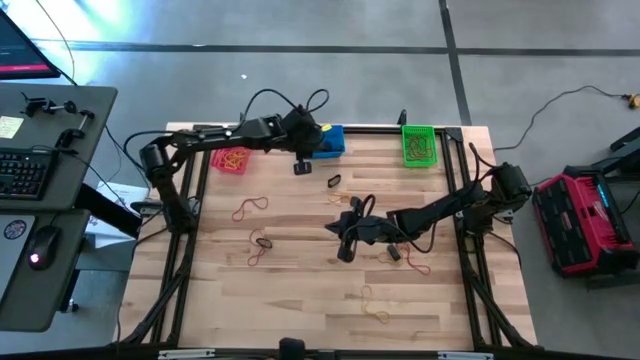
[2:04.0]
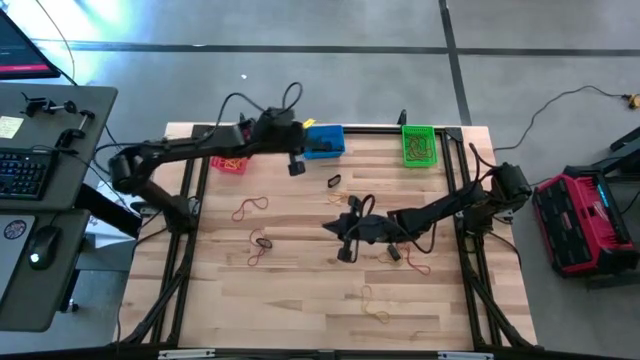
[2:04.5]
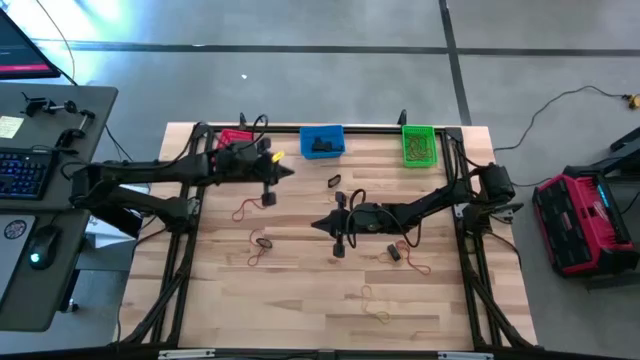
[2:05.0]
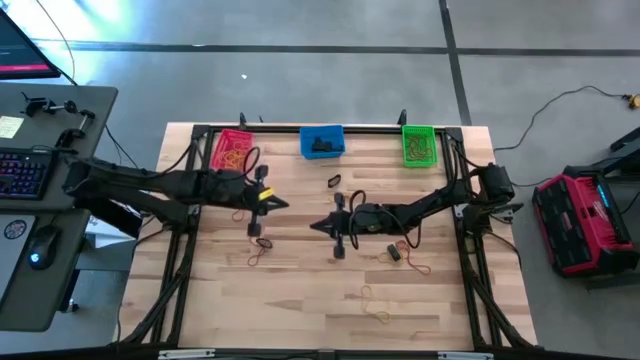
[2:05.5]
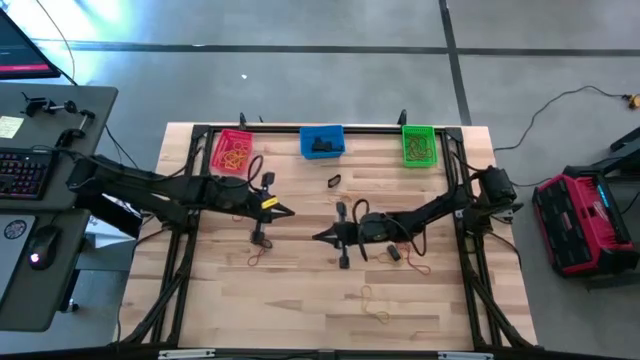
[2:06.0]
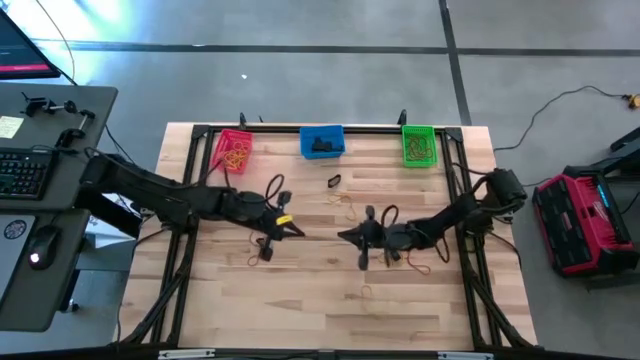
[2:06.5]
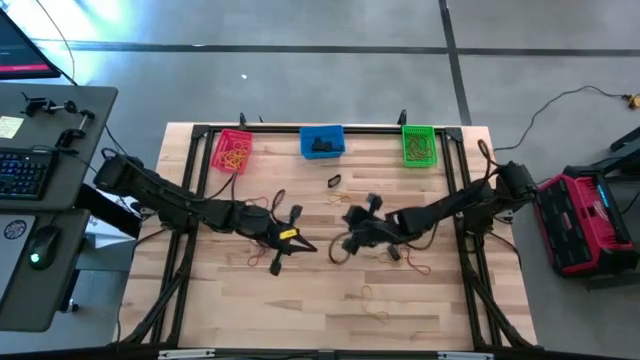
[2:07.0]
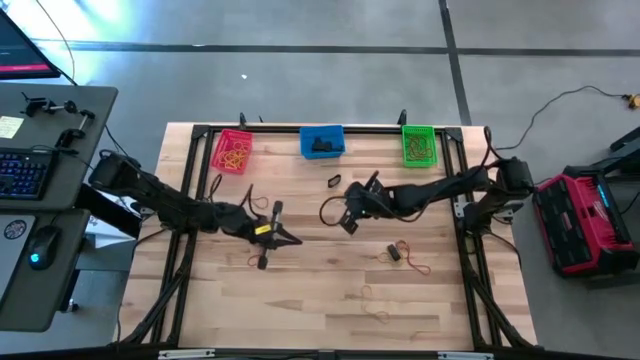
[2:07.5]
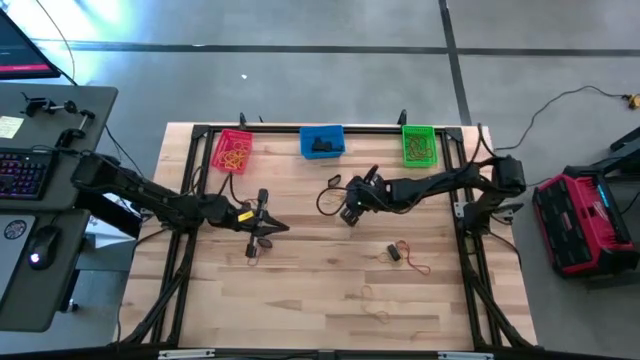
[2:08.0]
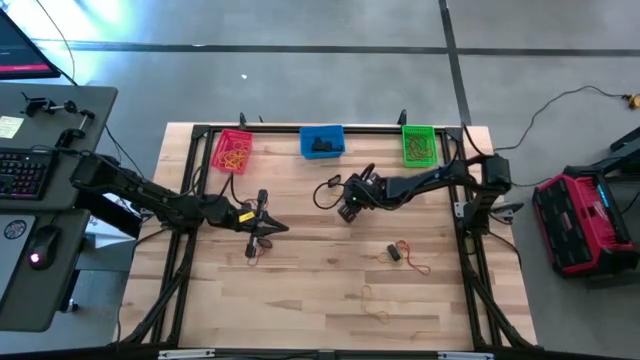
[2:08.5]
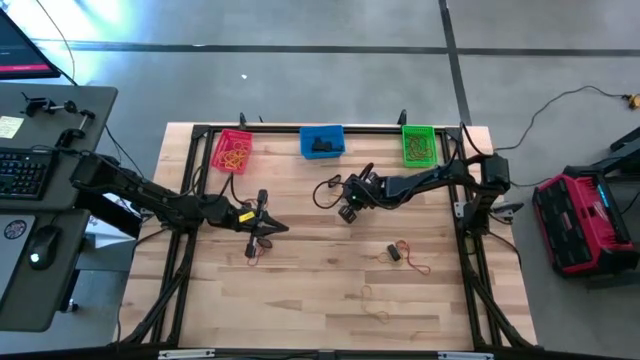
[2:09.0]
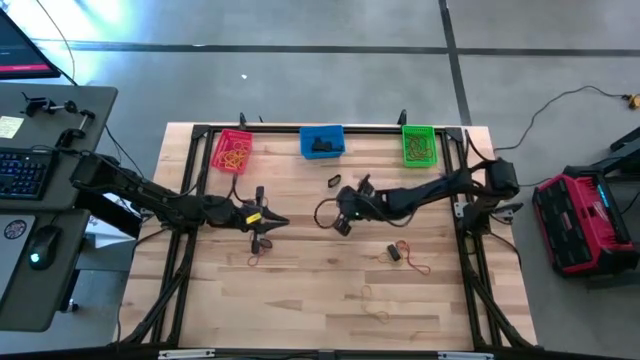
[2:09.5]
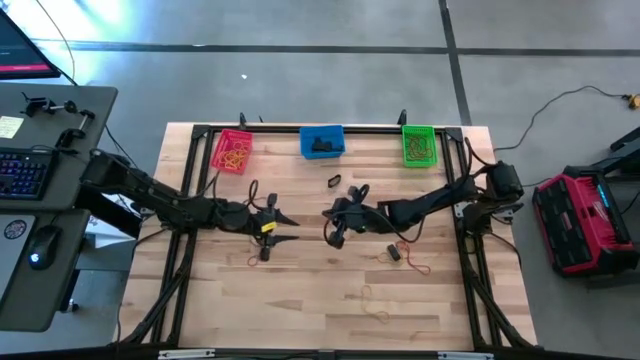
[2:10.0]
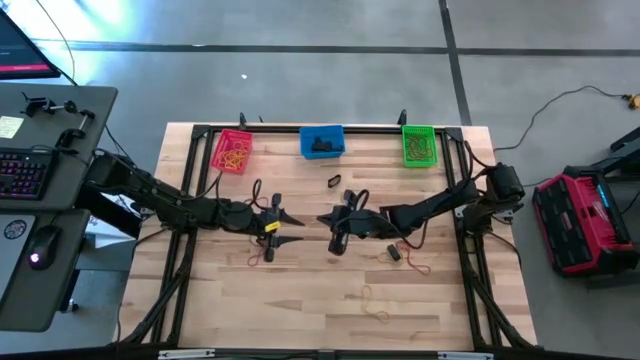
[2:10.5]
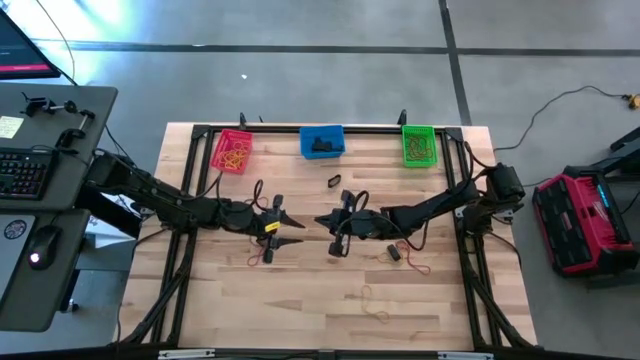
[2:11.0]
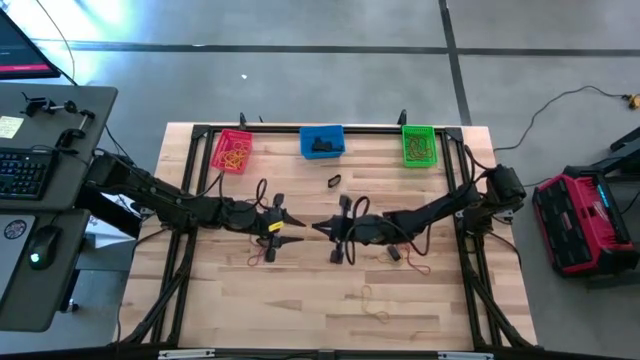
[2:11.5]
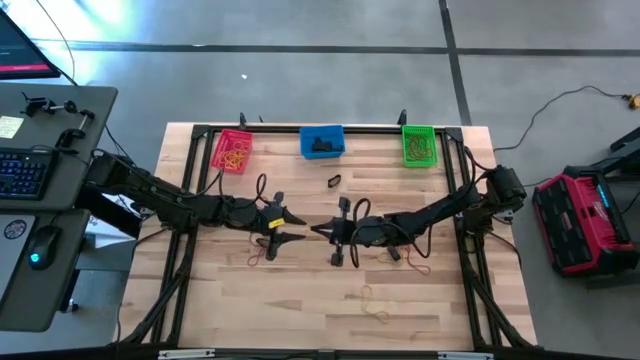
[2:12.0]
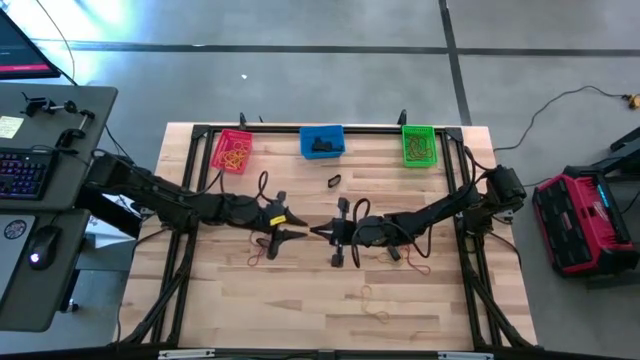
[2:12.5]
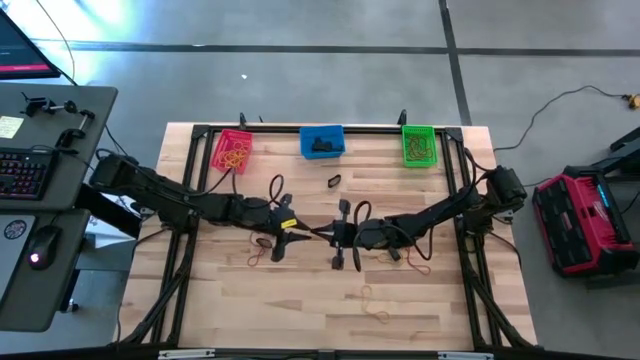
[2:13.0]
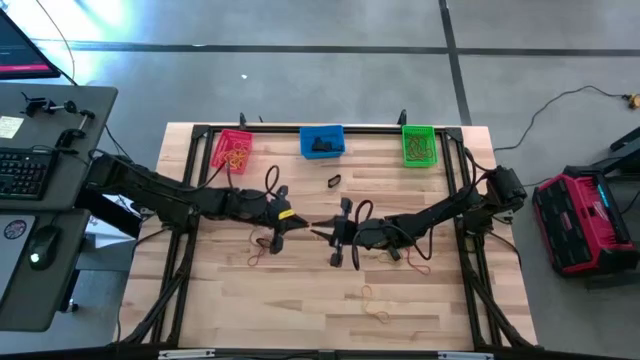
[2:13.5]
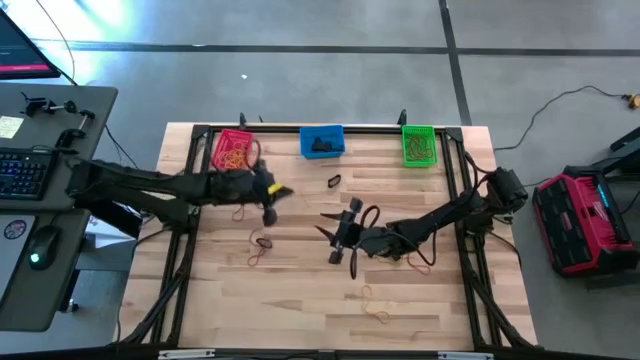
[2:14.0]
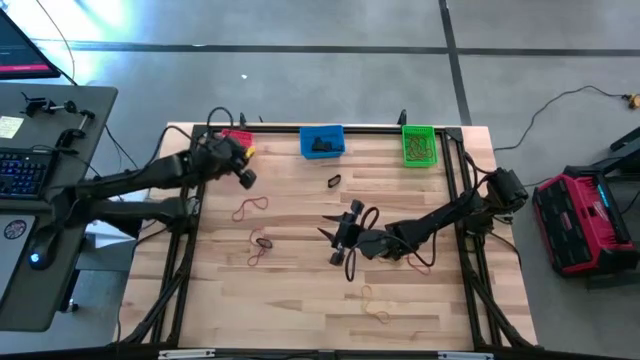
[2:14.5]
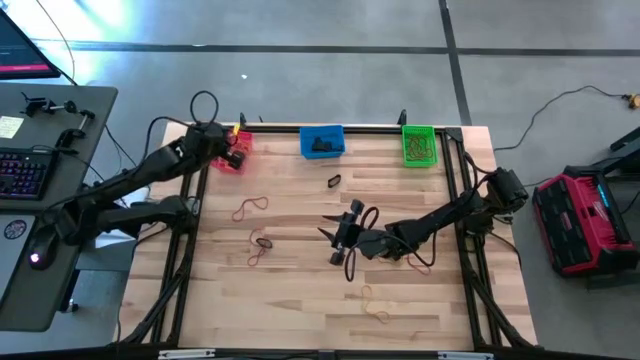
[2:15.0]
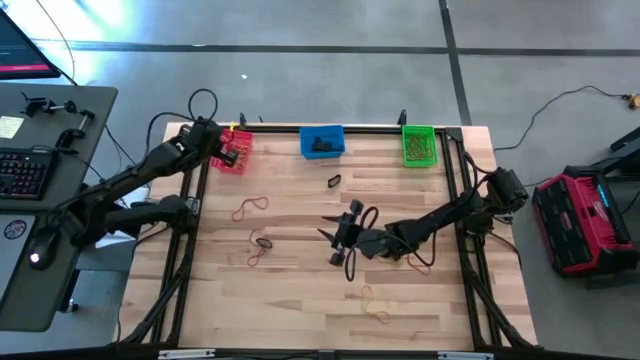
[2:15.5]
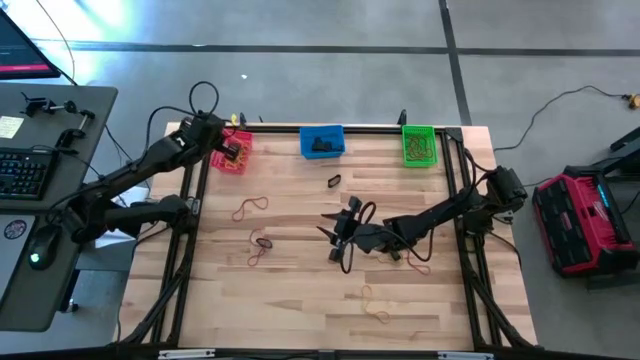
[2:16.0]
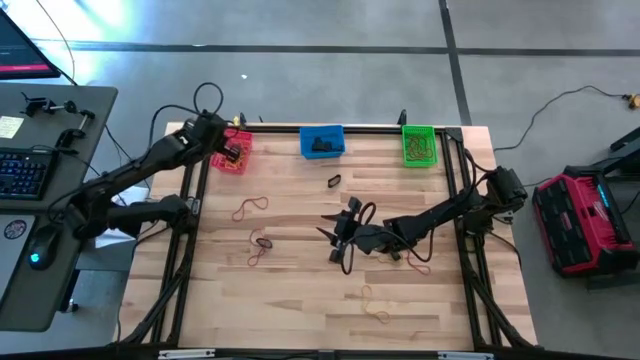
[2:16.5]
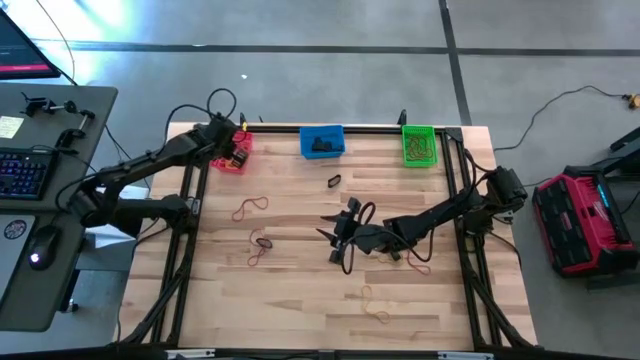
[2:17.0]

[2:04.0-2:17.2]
Task: Sort rubber bands into baskets
Put the top yellow rubber band into the red bin

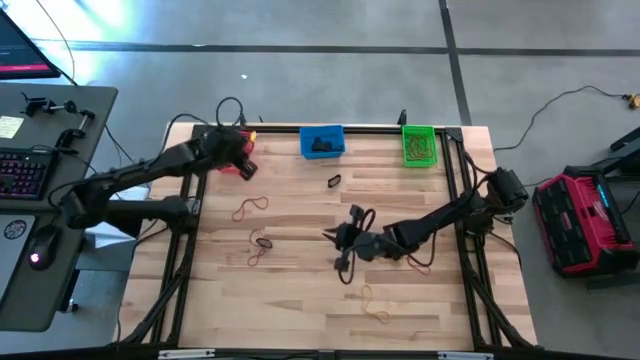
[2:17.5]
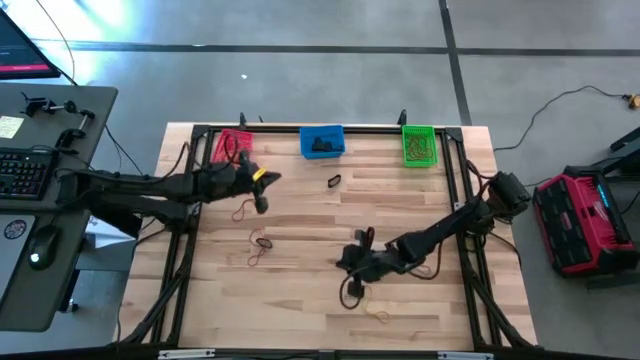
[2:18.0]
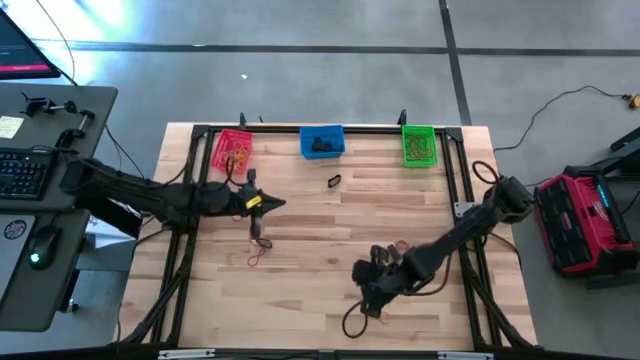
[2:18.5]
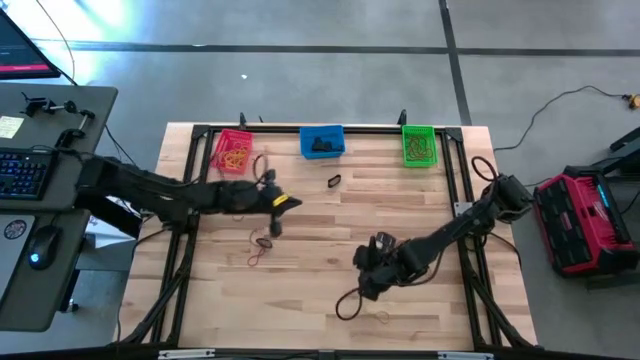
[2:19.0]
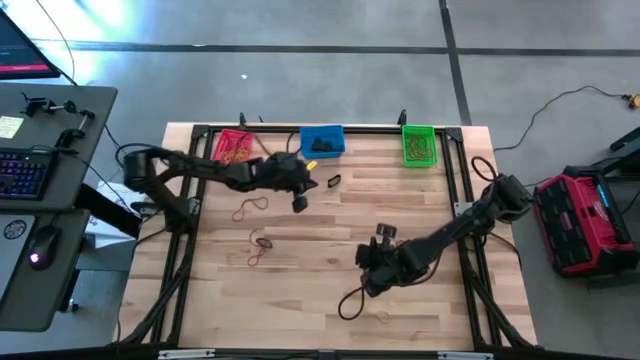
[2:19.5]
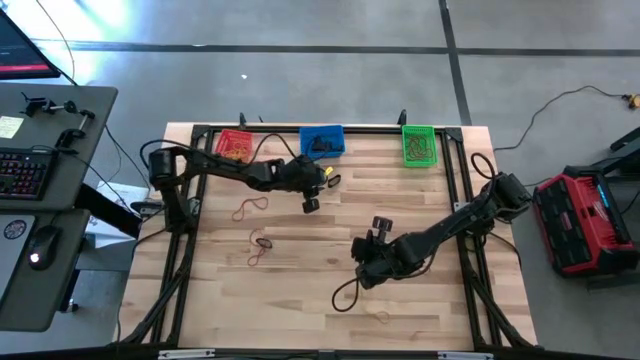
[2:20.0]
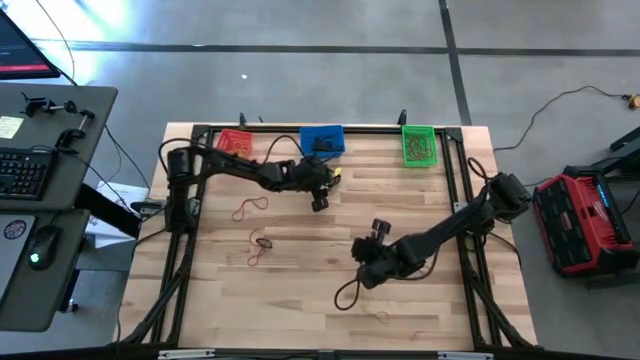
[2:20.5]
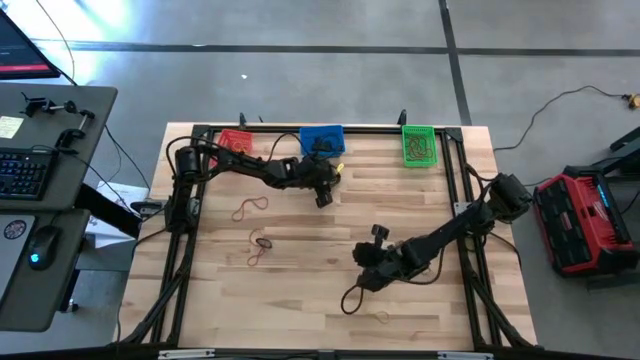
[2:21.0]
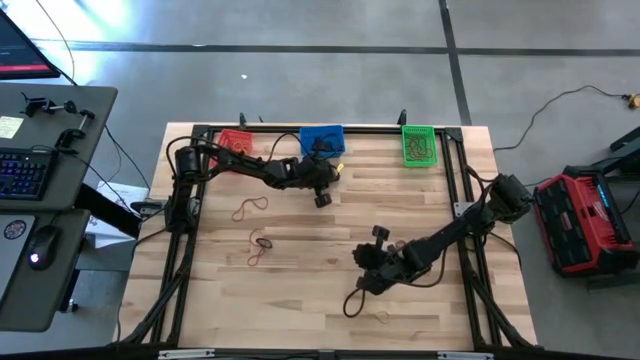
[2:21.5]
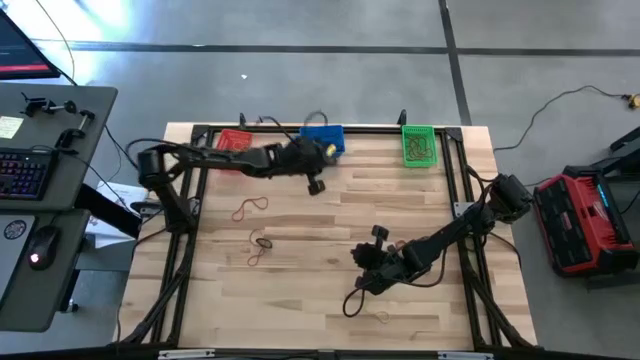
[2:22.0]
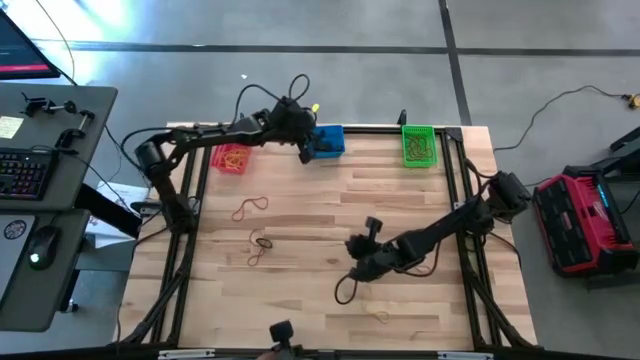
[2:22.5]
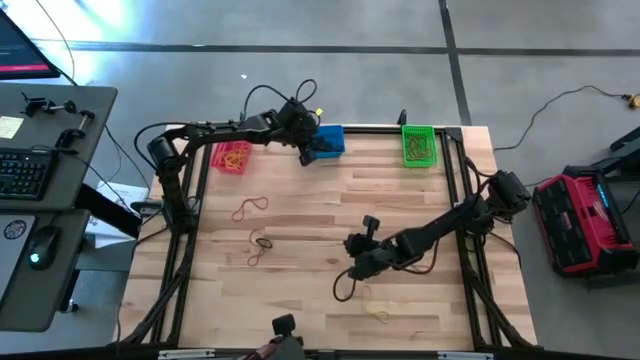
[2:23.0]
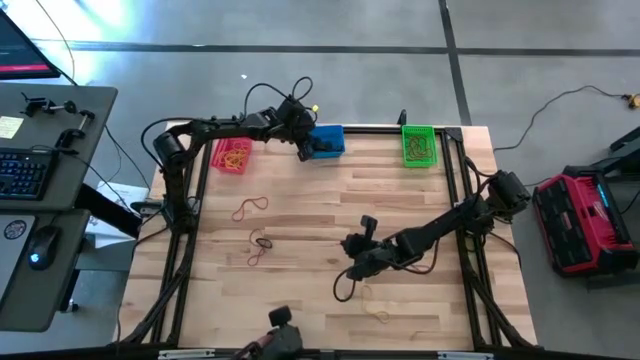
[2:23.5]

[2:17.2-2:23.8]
Put the top black rubber band into the blue bin
